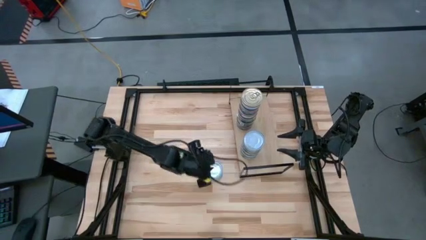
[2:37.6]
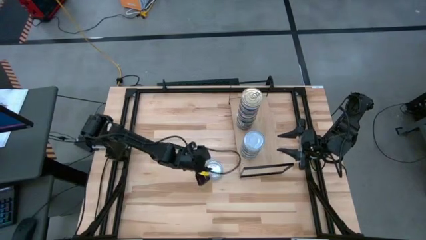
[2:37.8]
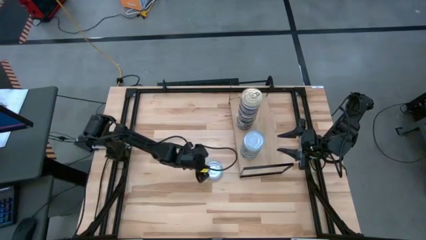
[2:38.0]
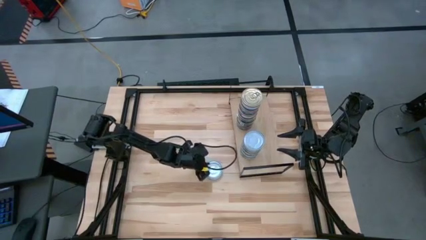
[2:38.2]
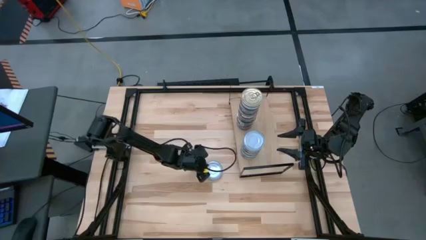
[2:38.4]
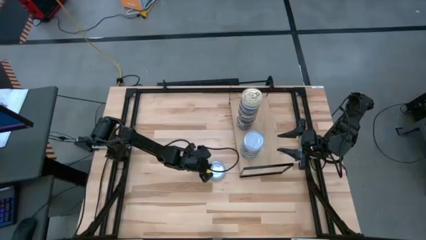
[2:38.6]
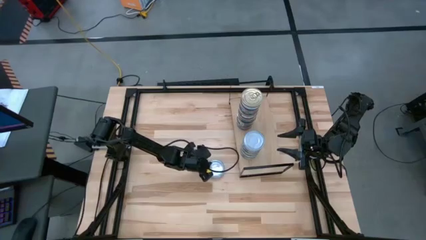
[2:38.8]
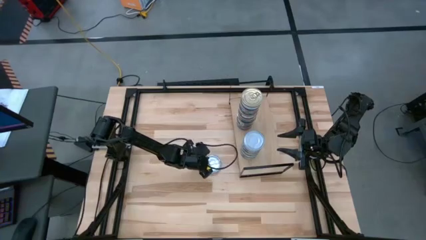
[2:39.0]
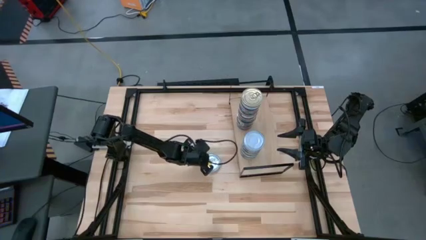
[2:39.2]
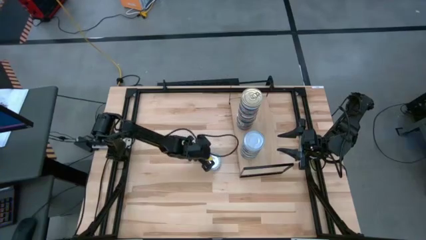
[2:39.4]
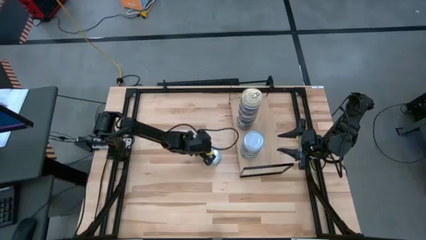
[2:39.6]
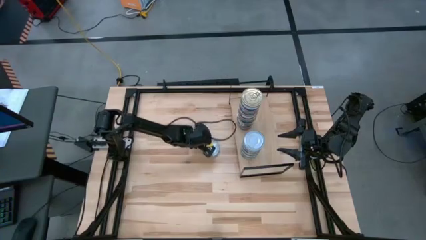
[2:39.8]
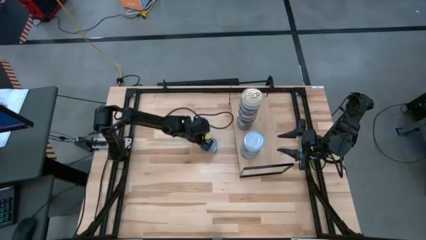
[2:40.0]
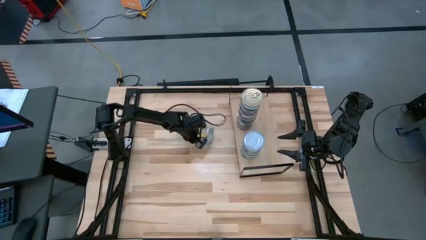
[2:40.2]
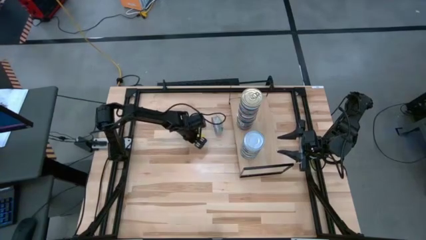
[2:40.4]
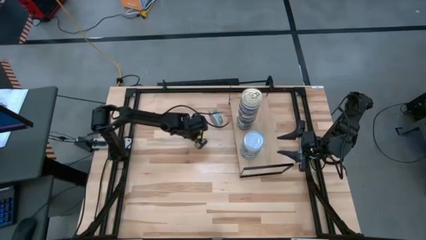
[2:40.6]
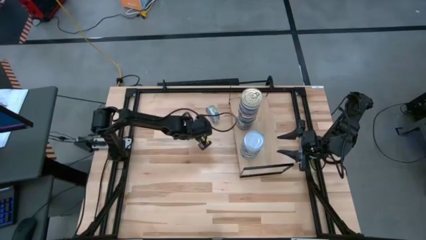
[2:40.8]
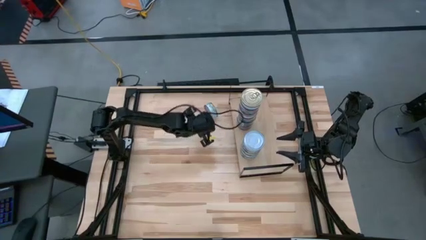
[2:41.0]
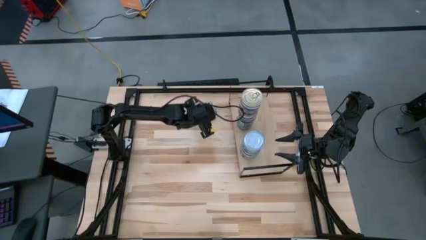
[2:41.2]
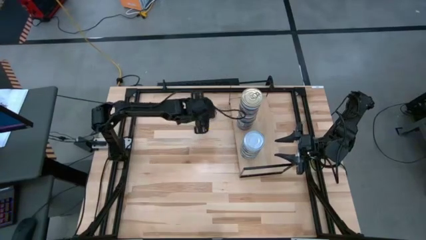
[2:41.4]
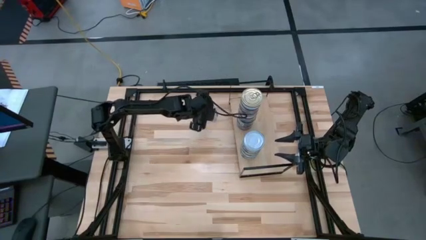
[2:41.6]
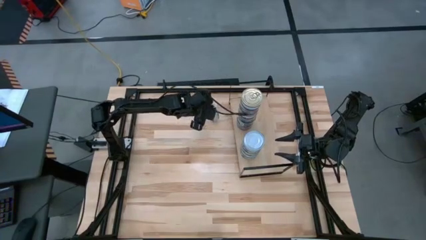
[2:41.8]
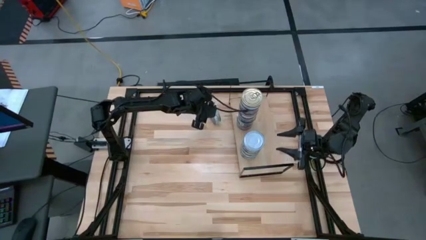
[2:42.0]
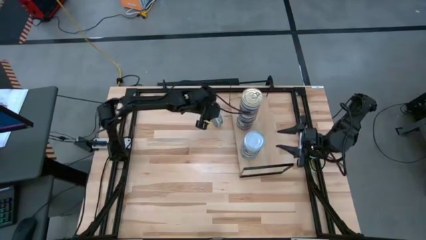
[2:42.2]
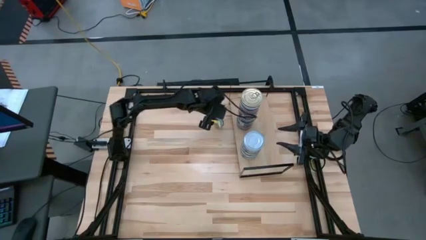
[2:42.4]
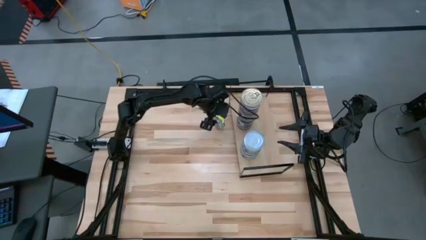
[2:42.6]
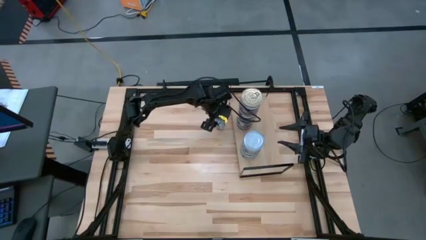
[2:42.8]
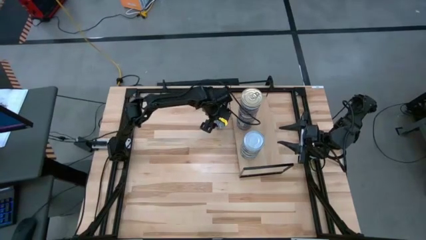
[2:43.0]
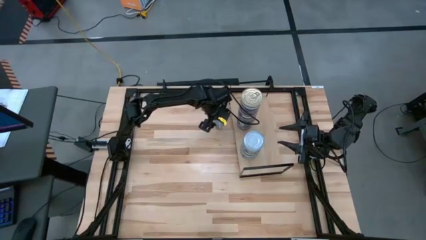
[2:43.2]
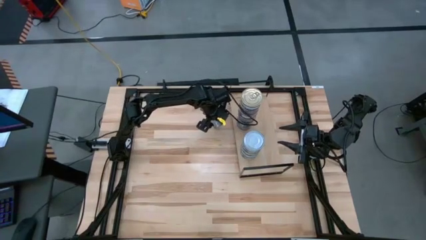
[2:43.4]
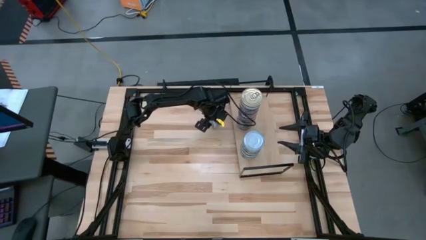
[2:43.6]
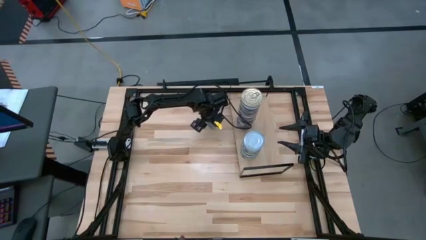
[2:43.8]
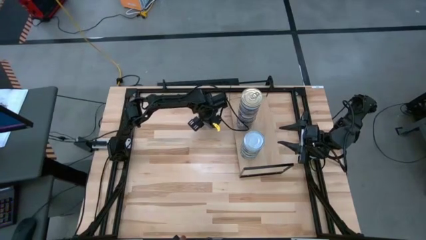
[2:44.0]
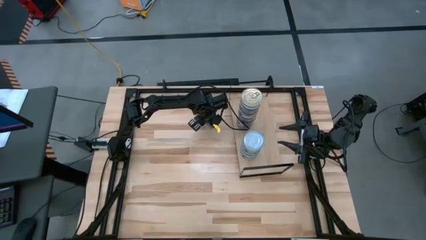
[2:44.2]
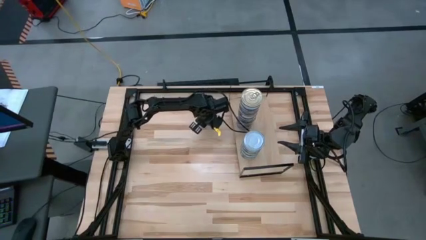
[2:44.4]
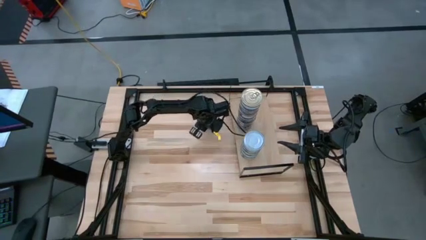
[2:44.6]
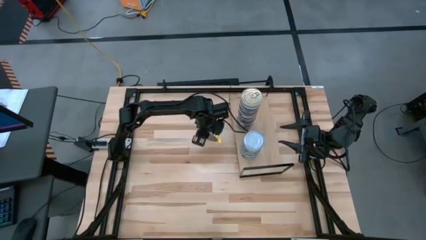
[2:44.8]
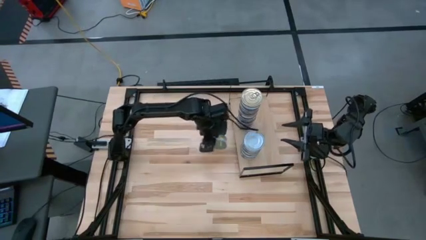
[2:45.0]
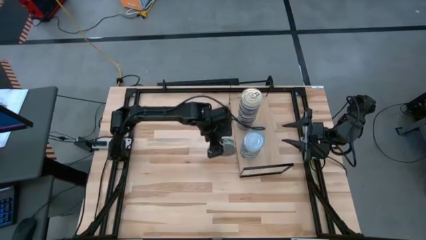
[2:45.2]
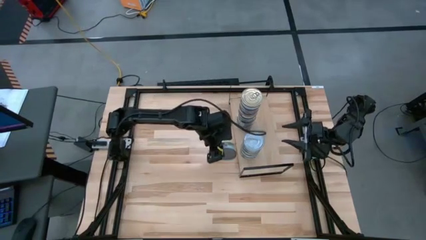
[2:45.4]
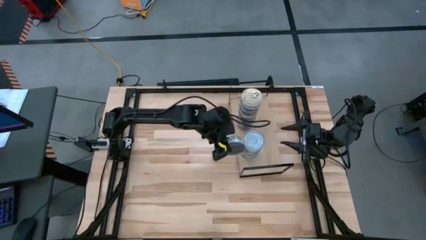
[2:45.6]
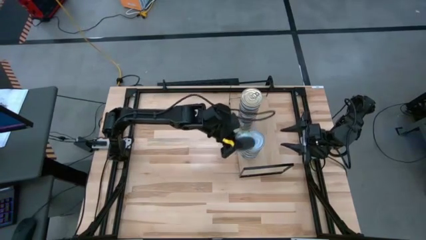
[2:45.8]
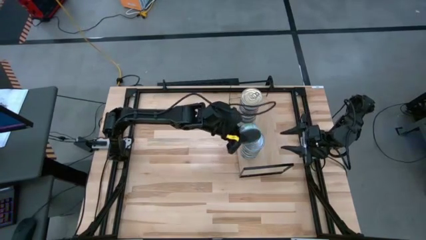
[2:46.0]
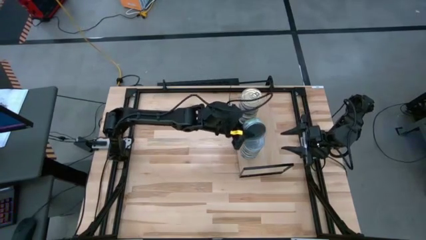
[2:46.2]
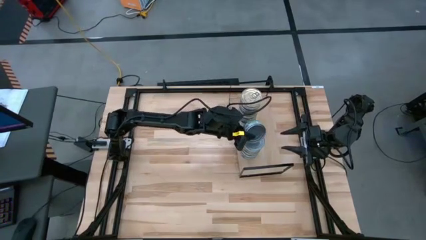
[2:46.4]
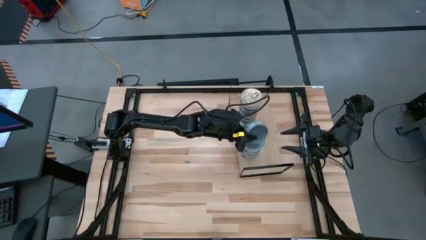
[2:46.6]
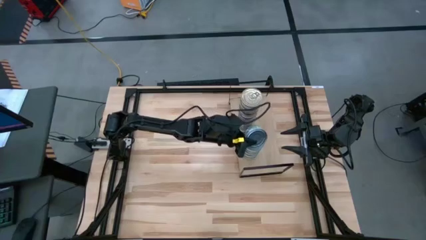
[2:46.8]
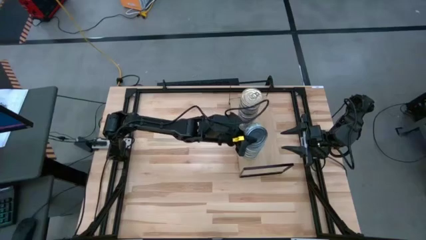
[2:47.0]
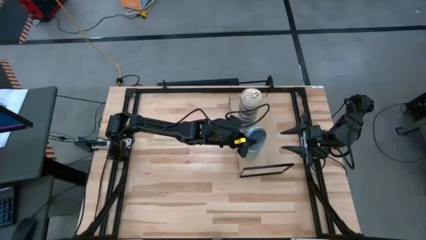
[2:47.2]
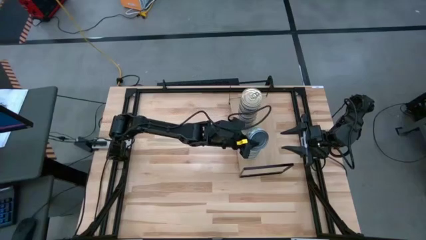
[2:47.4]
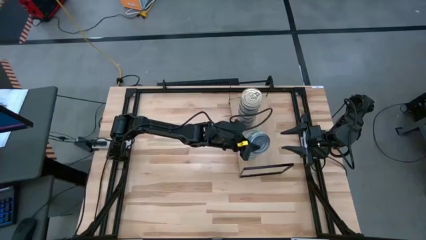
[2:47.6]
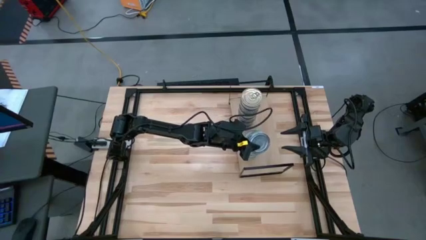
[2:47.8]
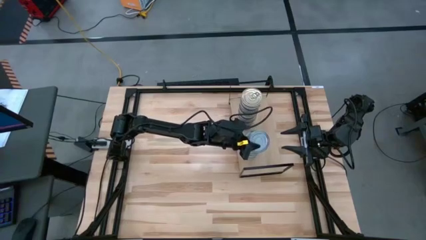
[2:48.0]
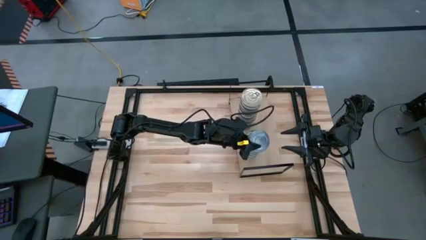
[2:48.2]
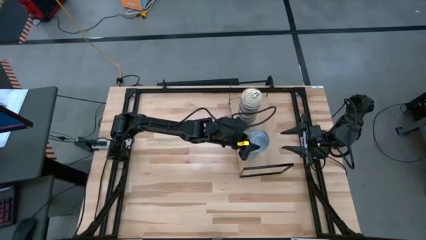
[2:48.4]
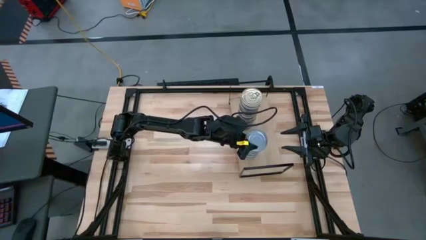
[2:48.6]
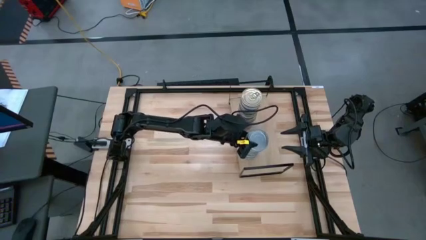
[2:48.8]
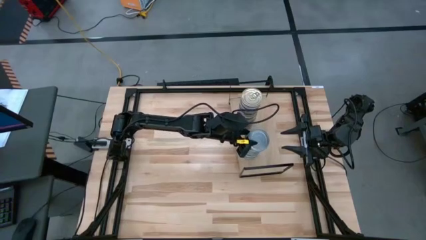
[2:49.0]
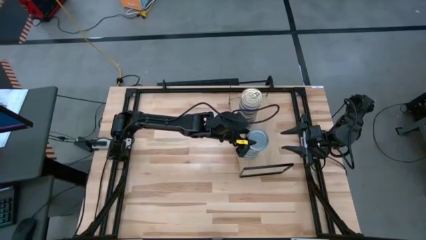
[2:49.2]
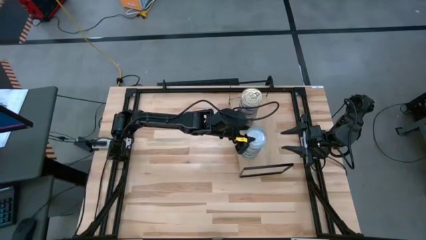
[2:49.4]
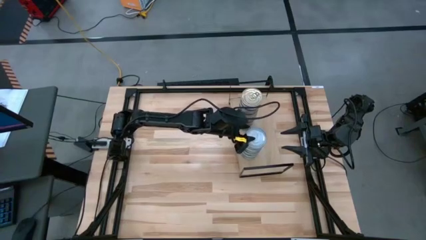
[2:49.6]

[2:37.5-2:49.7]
Task: Stack canned seafood by type on shelf
Stack the green tuna can on top of the other green tuna can on the shelf
